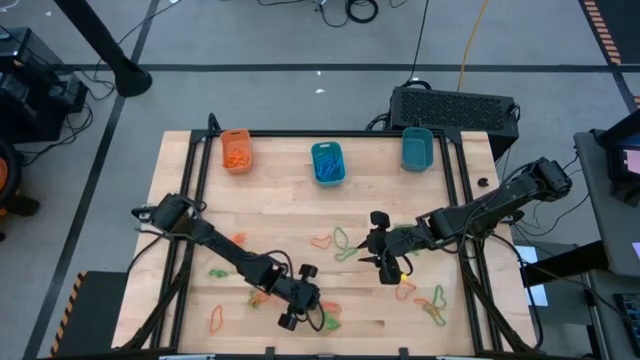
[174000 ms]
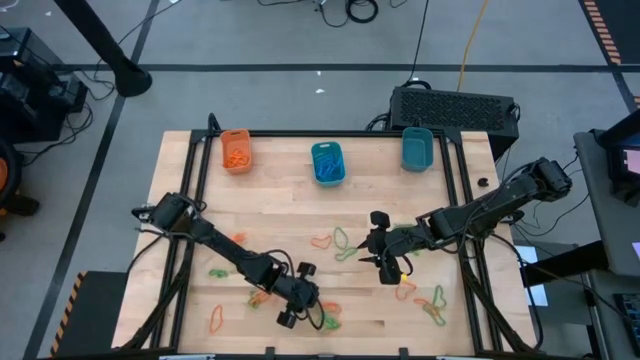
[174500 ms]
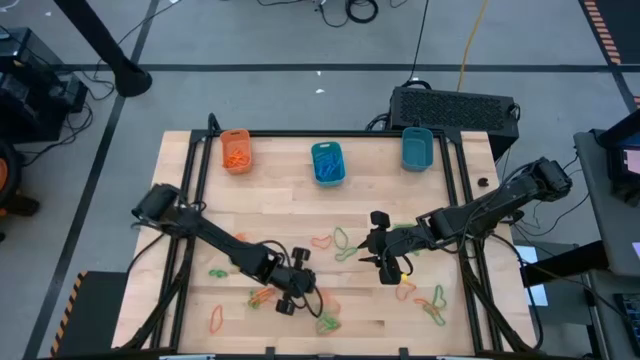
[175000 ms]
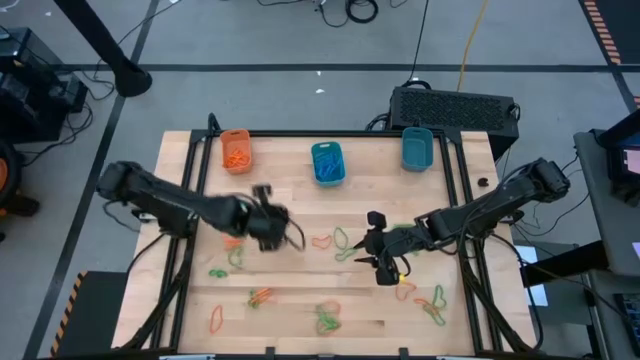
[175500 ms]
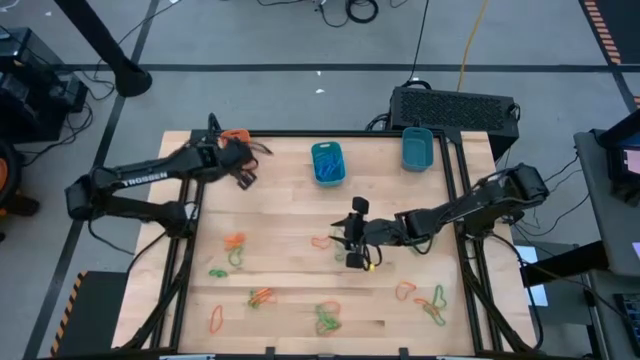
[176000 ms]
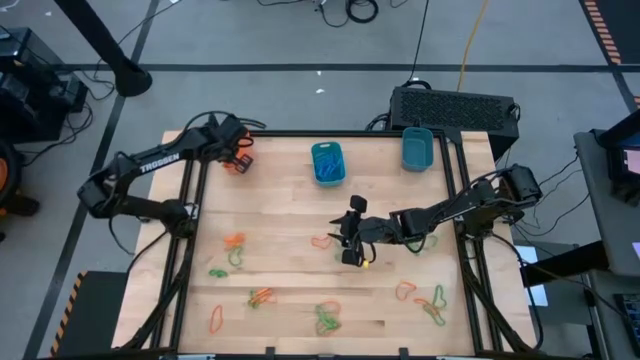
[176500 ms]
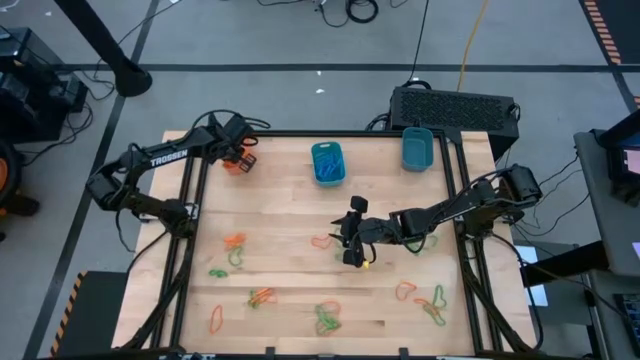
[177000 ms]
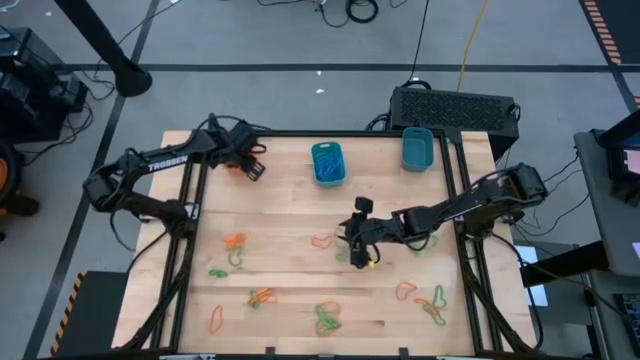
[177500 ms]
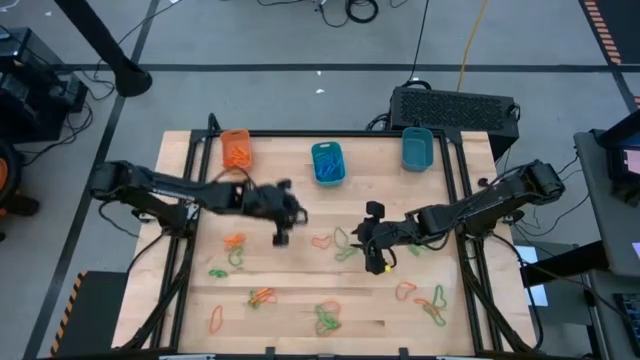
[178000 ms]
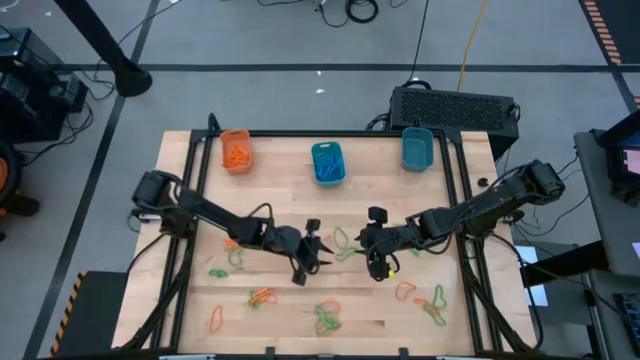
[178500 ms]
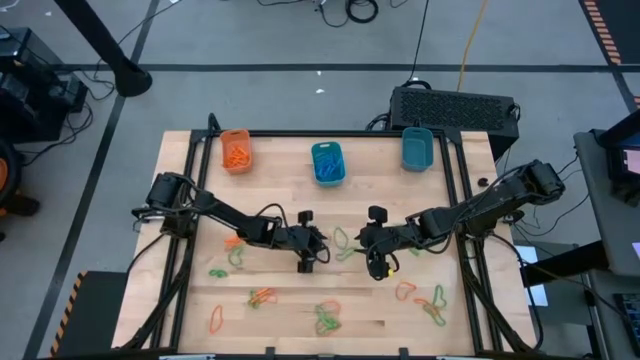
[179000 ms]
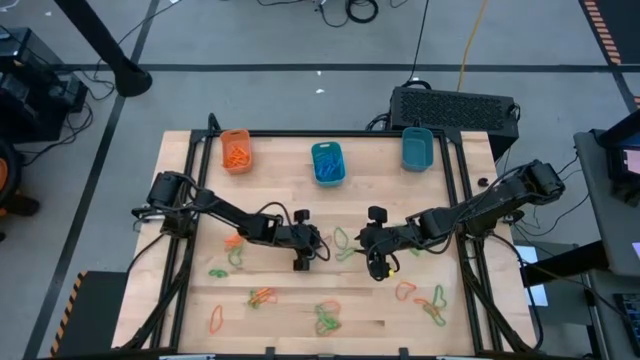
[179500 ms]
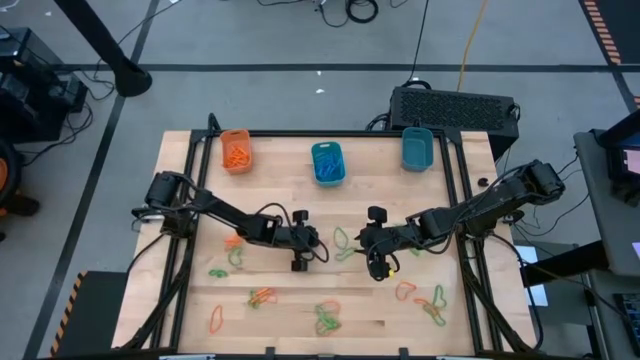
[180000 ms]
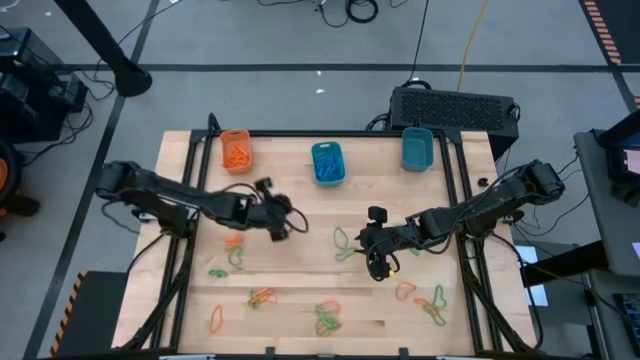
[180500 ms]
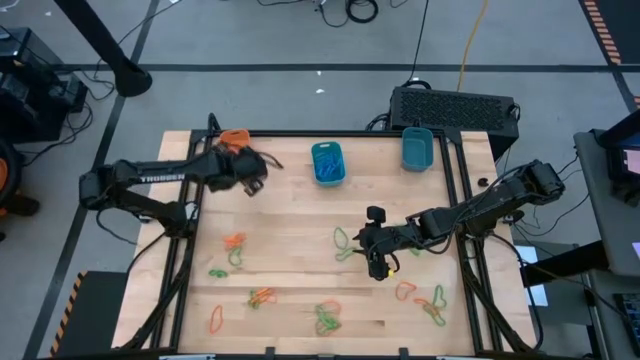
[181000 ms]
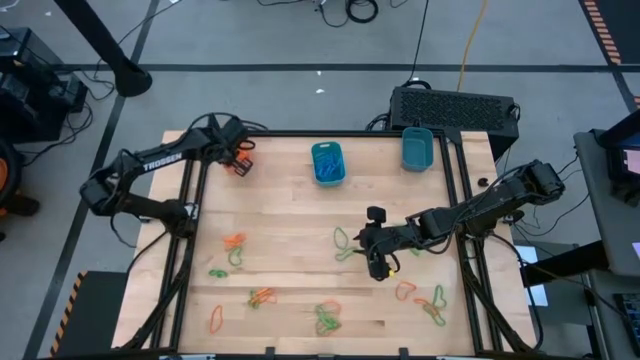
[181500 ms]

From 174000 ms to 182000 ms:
Task: Sort rubber bands into baskets
Put the orange rubber band into the orange bin

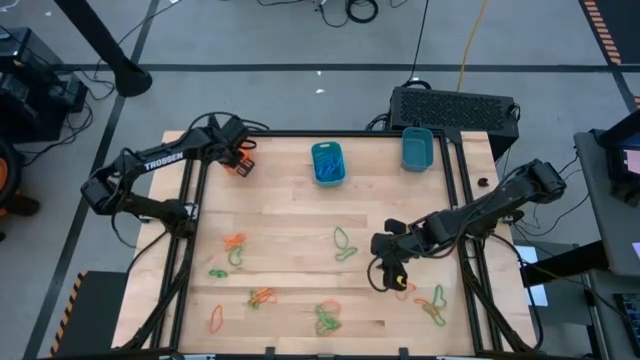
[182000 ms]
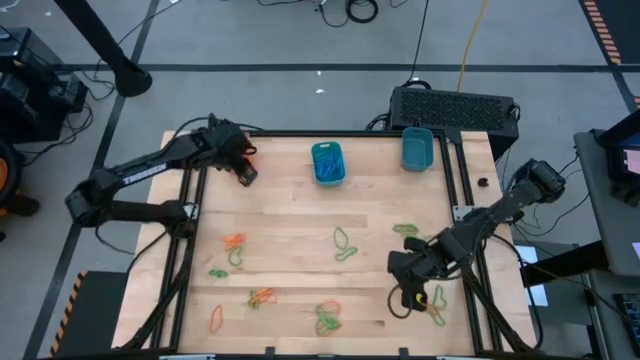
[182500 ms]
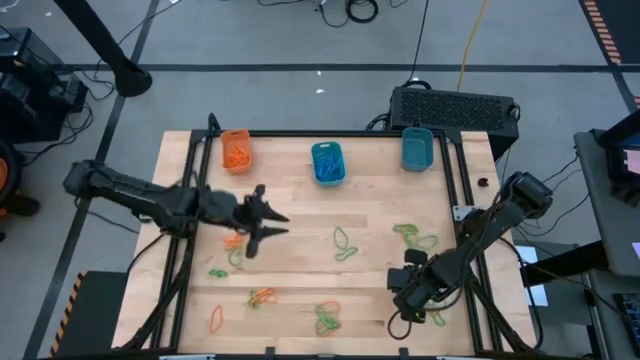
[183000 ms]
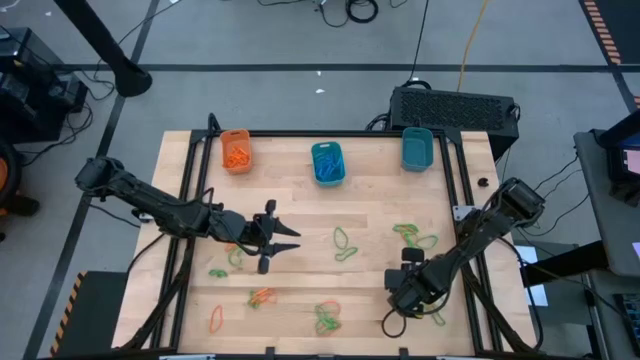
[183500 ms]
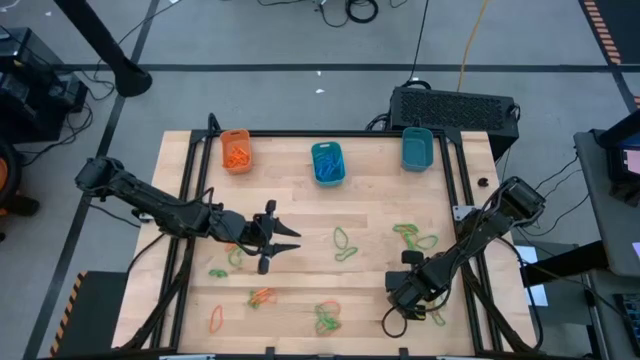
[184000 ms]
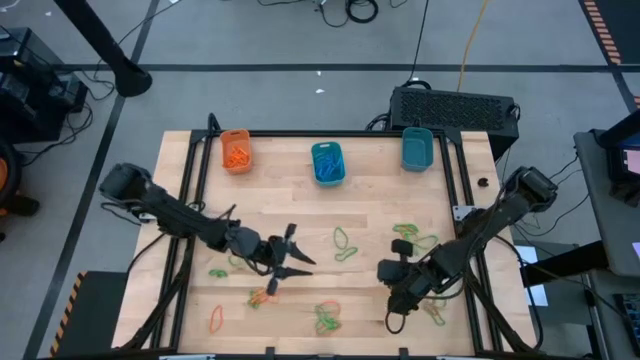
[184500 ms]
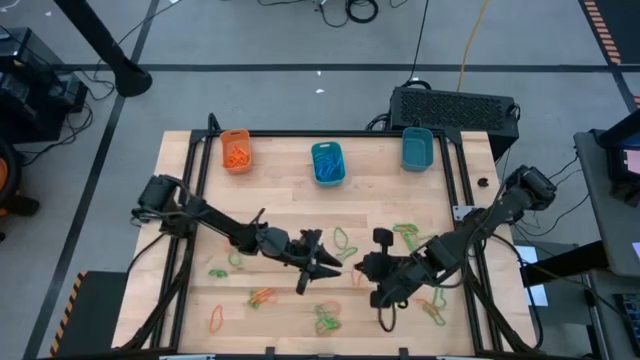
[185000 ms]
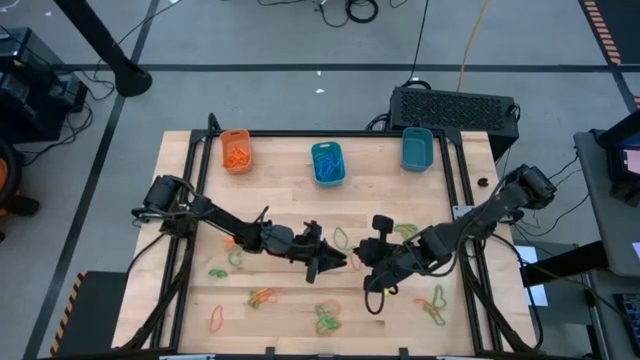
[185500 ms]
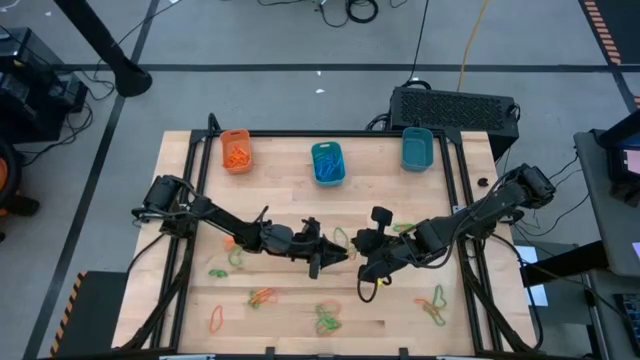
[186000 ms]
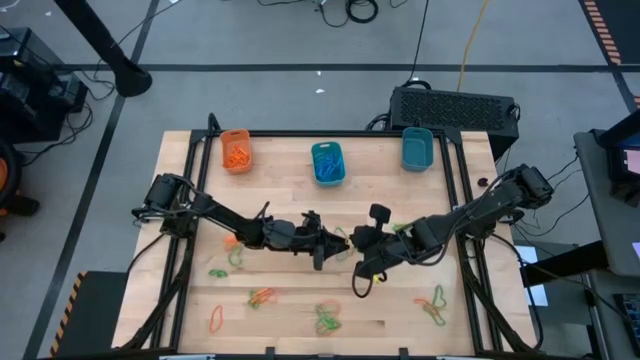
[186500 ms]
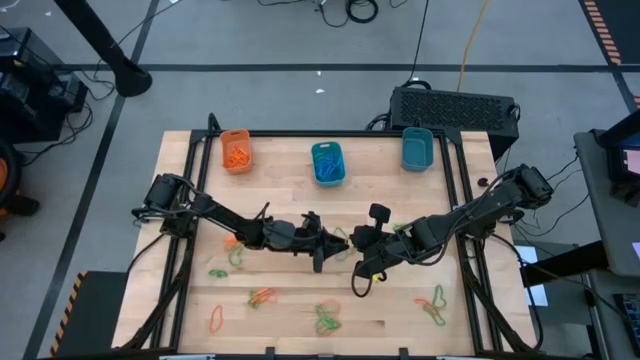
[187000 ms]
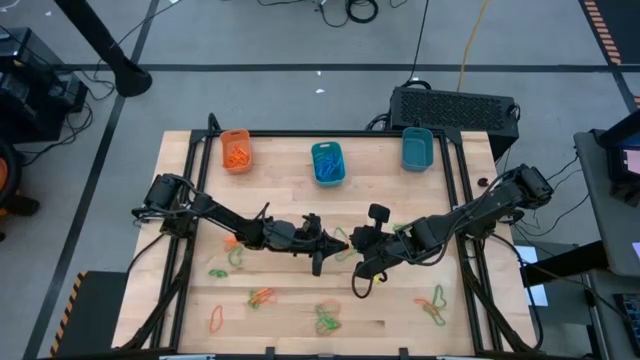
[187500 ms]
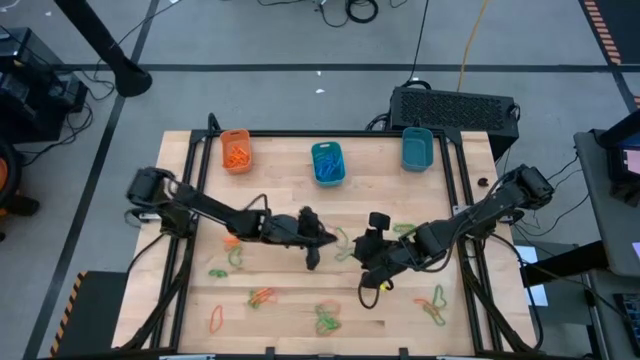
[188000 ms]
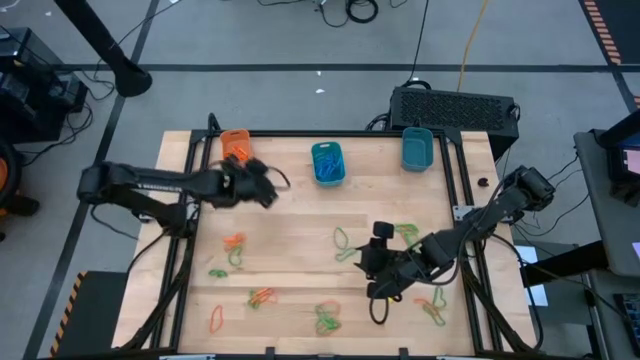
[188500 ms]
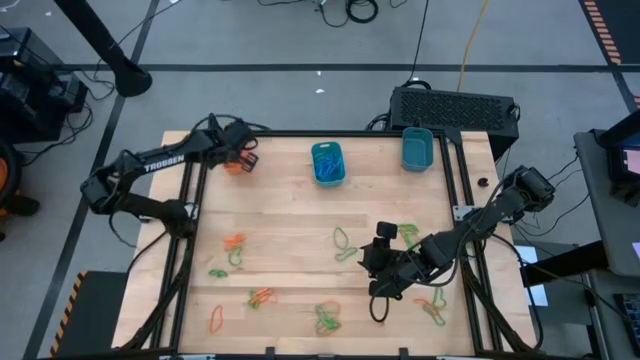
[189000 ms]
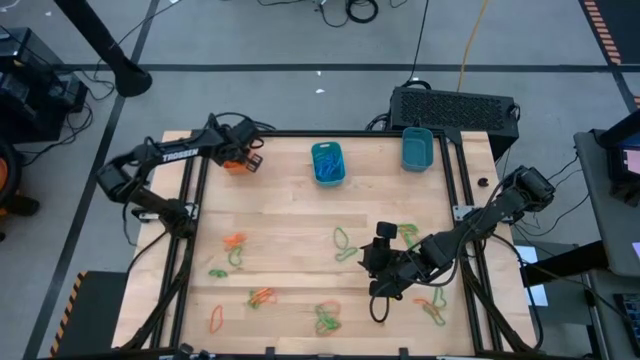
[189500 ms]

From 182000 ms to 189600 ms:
Put the orange rubber band into the orange bin

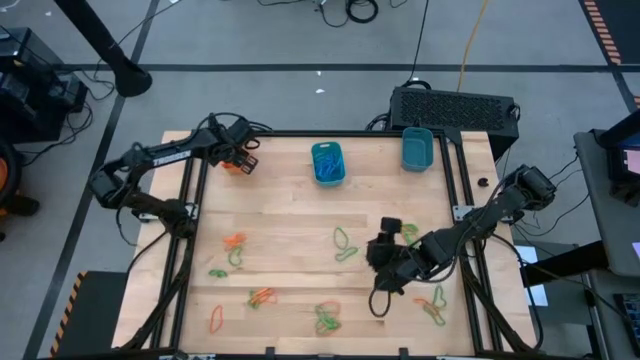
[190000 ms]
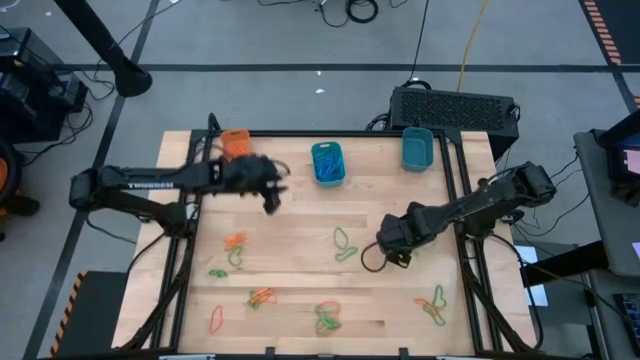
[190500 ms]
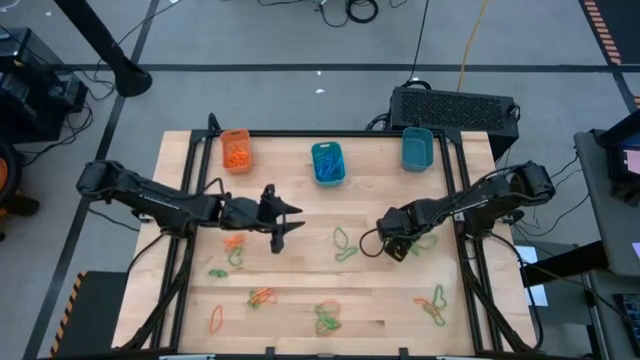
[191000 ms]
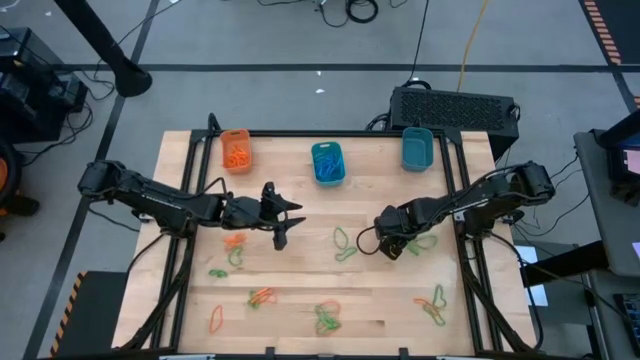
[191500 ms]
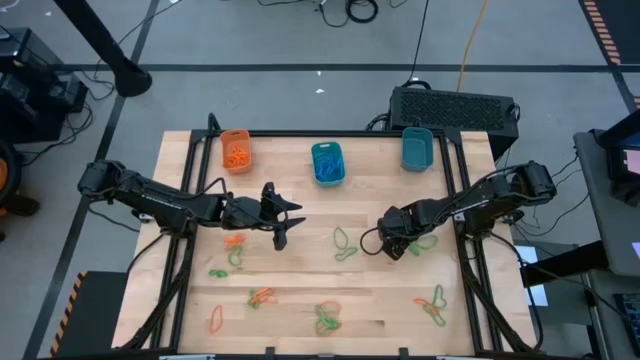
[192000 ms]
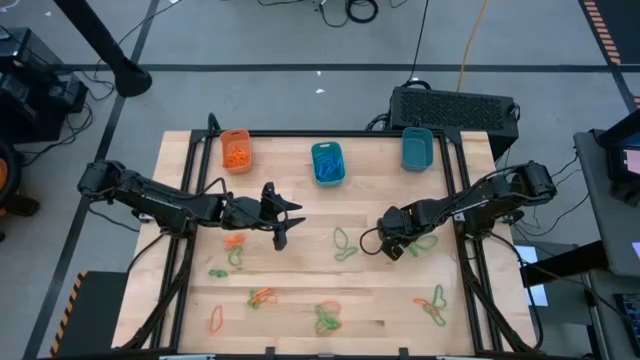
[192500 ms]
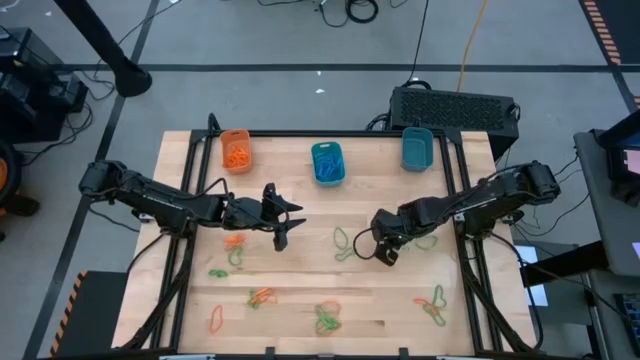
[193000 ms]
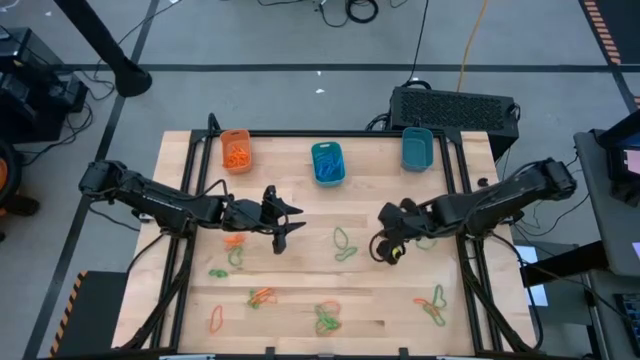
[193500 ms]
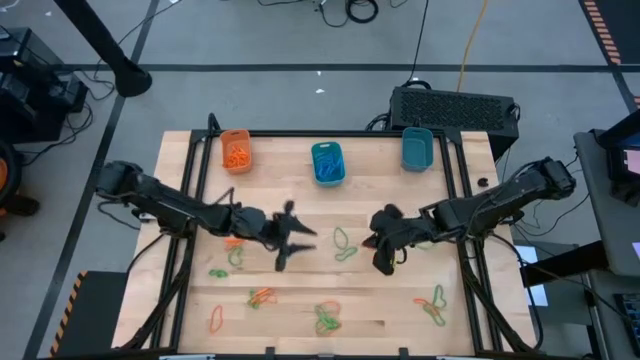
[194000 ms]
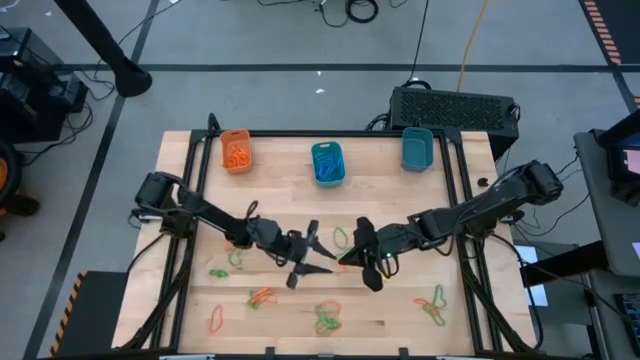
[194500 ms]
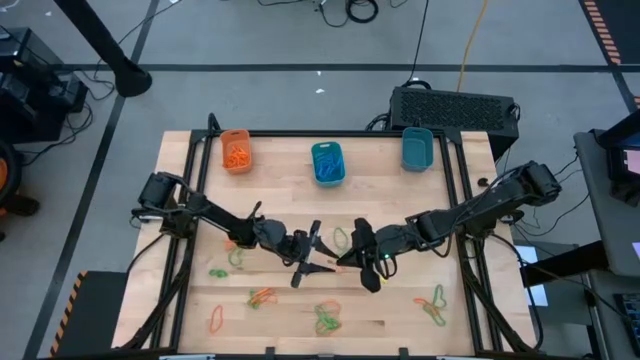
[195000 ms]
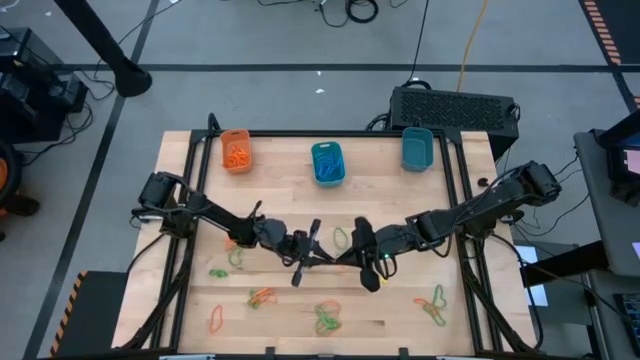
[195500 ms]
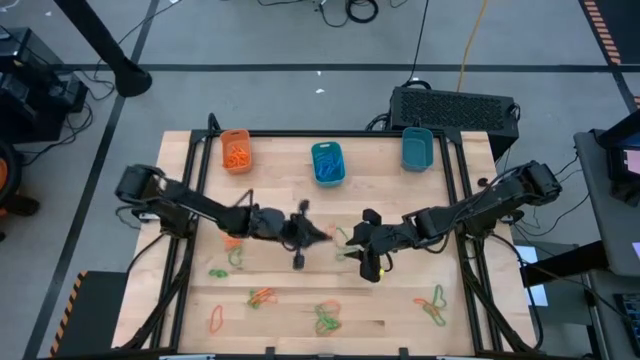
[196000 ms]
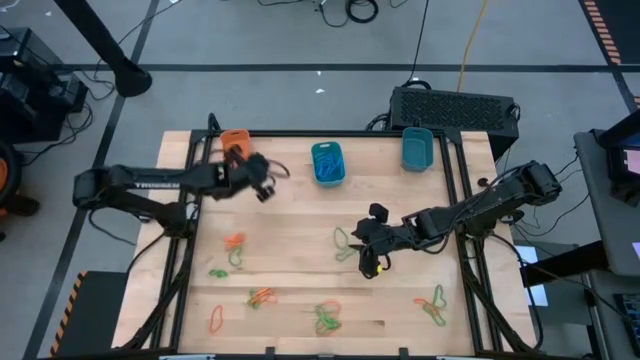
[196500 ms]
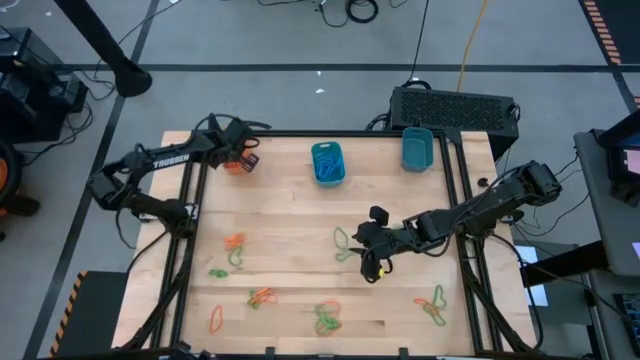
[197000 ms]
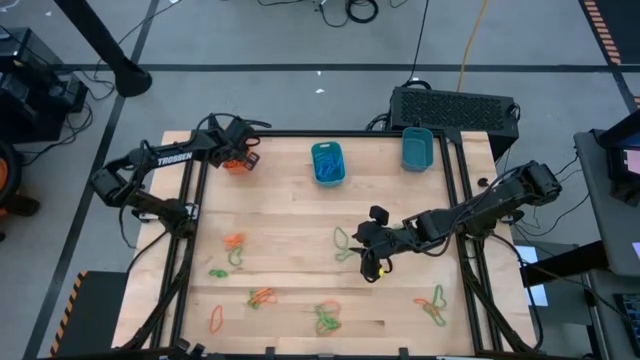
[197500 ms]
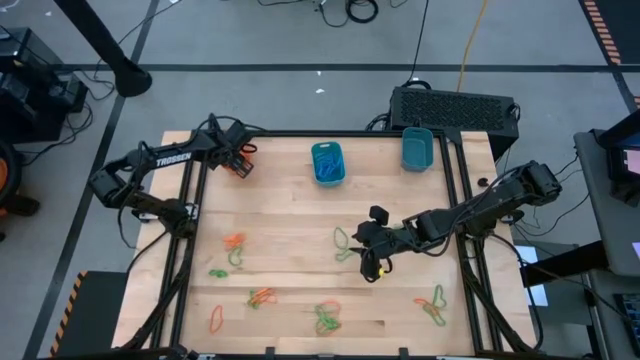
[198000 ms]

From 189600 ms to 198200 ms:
Put the orange rubber band into the orange bin
